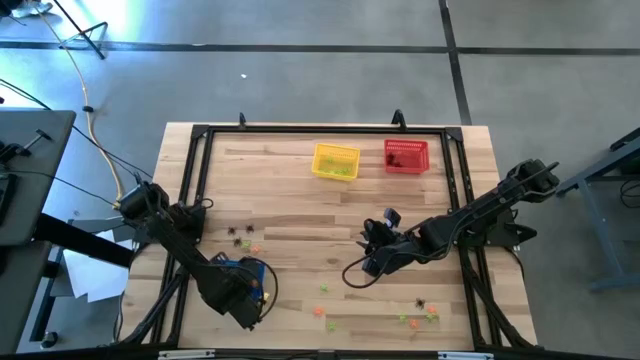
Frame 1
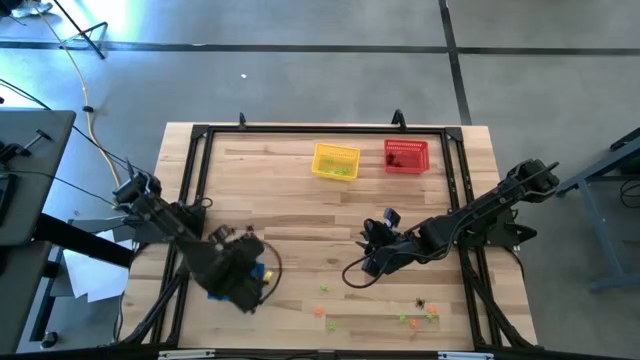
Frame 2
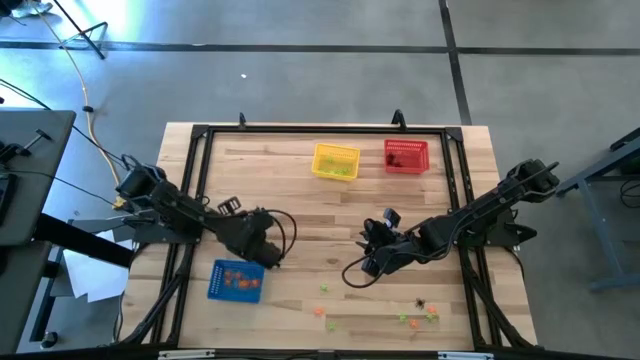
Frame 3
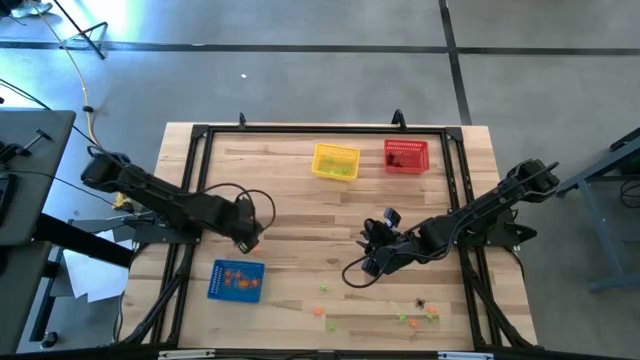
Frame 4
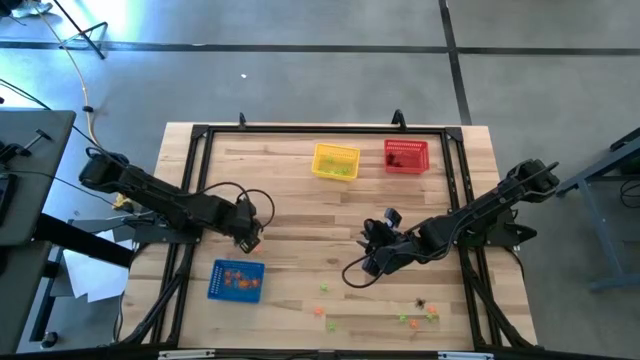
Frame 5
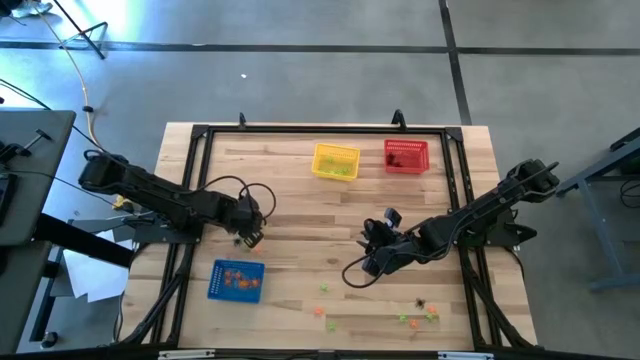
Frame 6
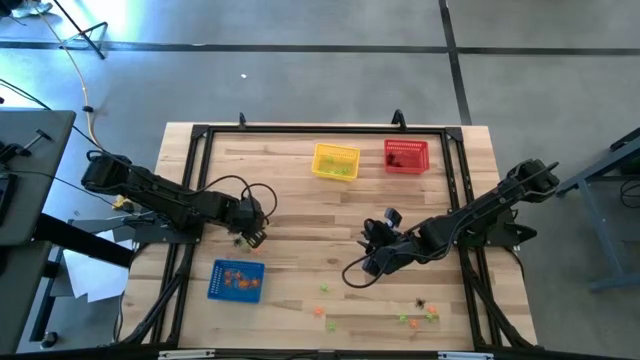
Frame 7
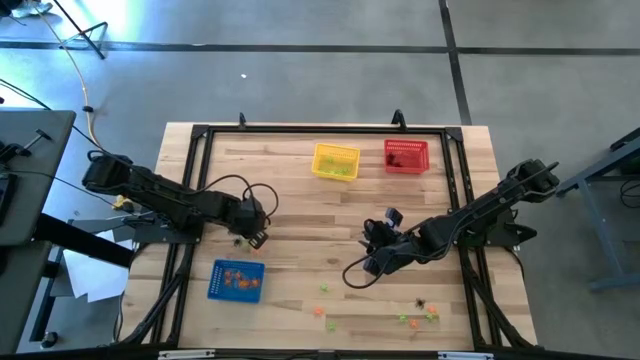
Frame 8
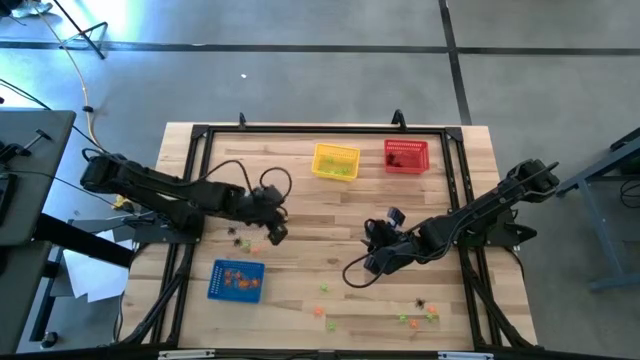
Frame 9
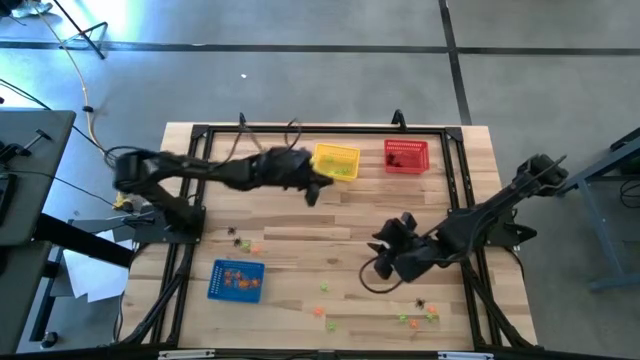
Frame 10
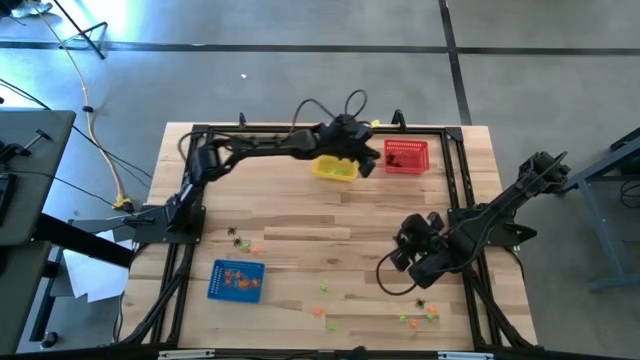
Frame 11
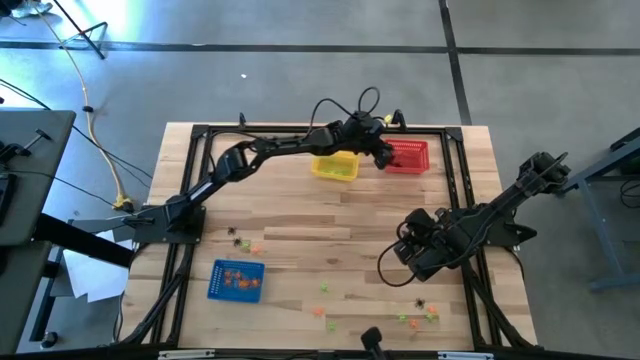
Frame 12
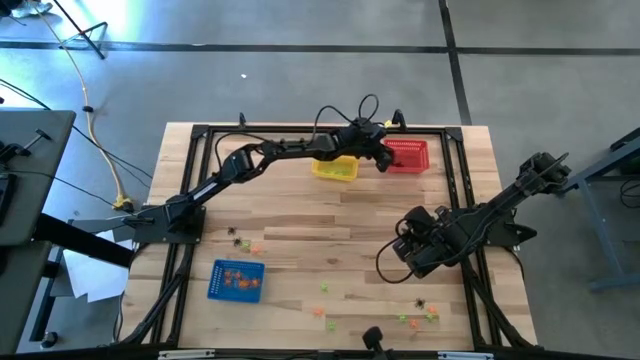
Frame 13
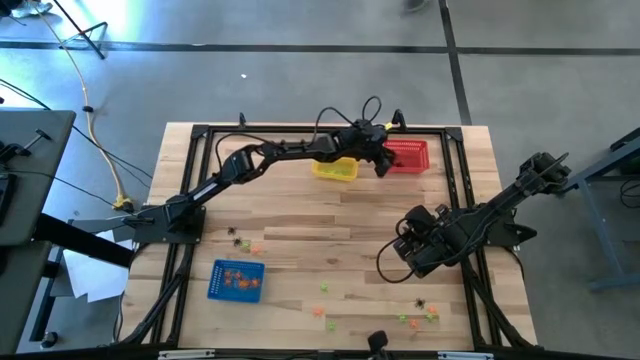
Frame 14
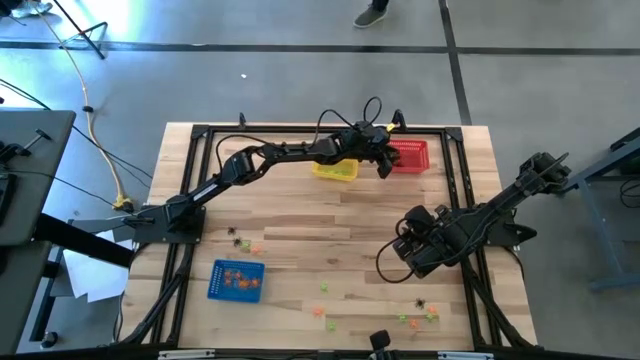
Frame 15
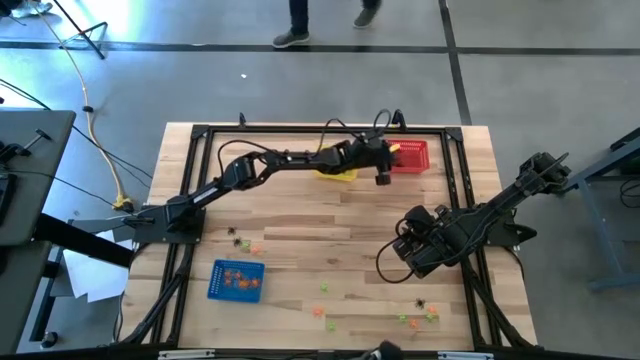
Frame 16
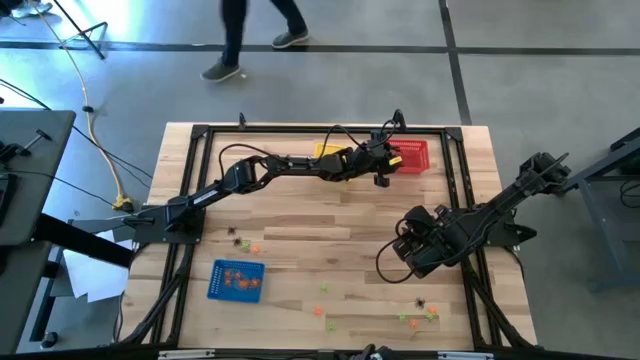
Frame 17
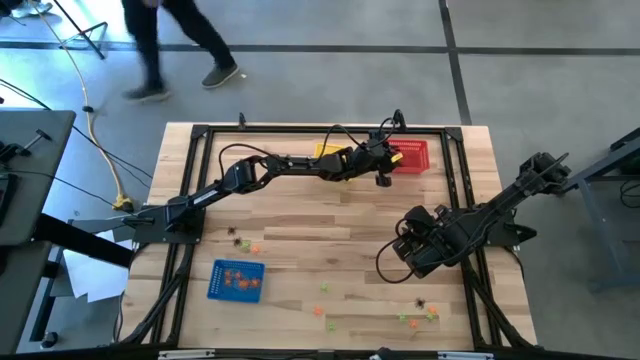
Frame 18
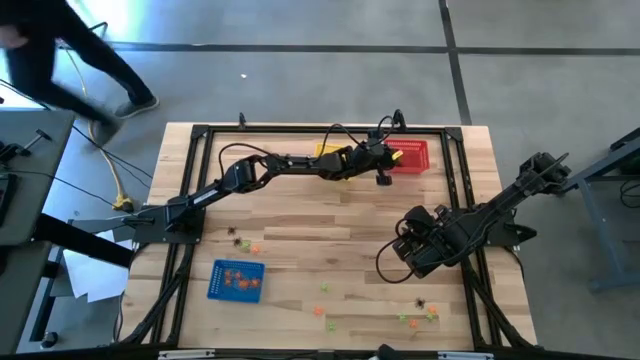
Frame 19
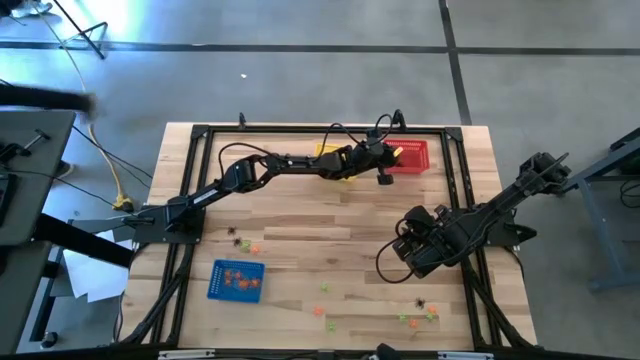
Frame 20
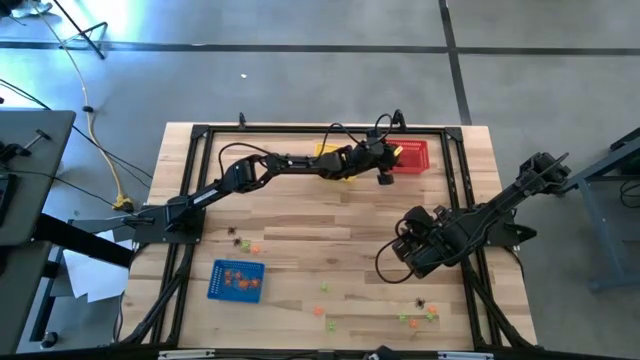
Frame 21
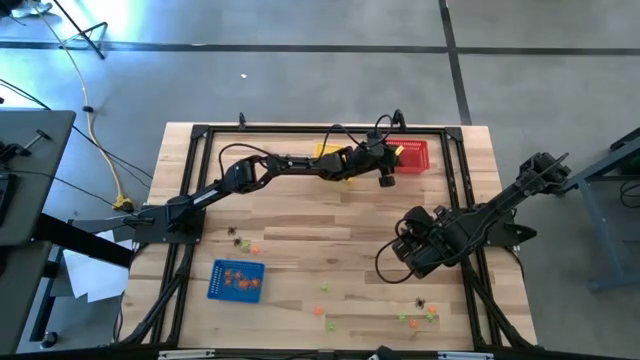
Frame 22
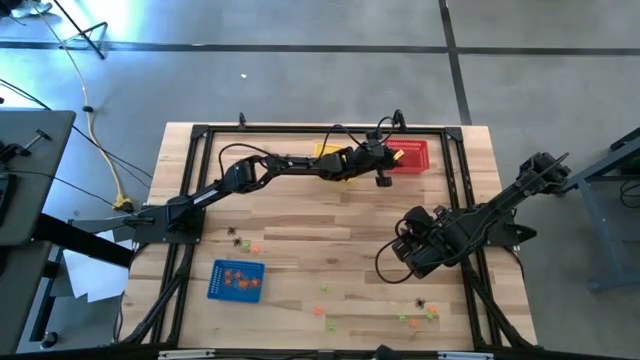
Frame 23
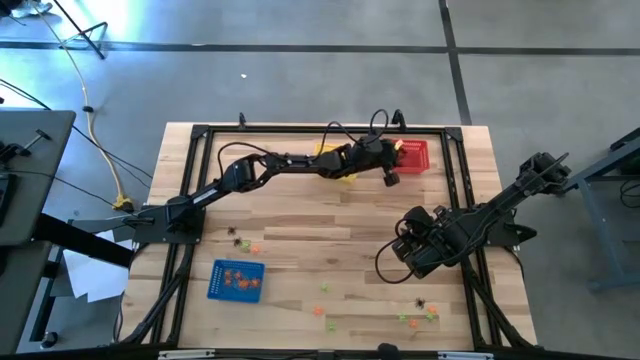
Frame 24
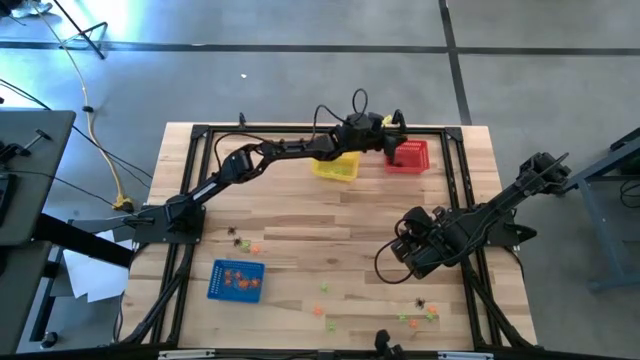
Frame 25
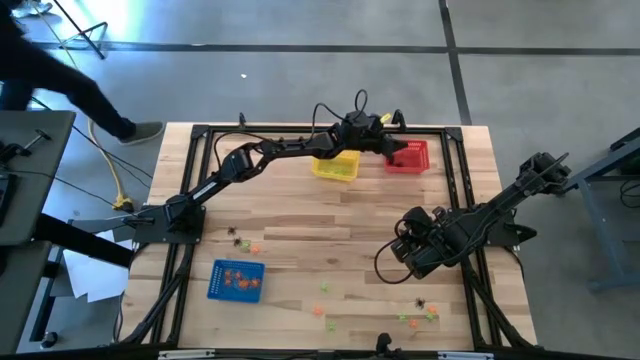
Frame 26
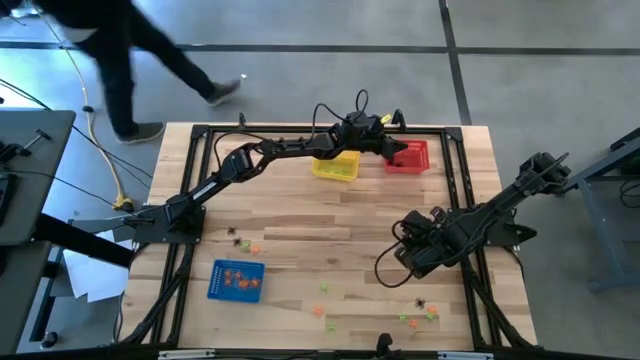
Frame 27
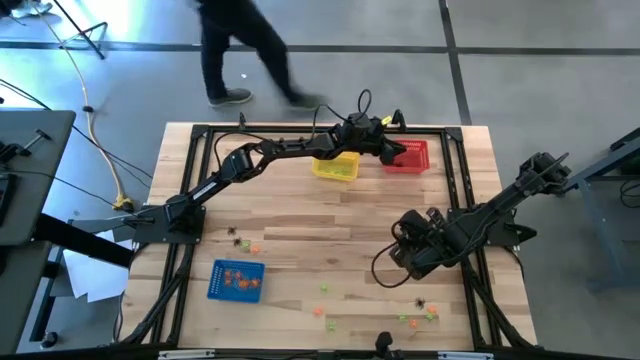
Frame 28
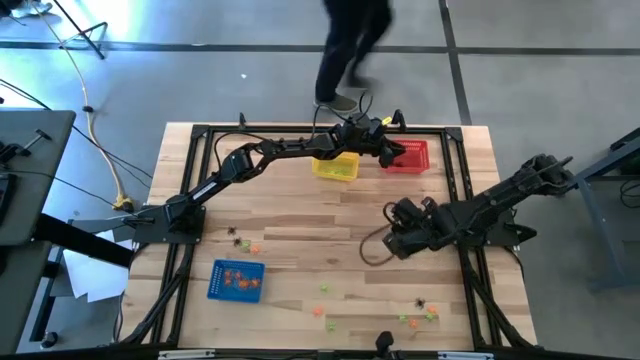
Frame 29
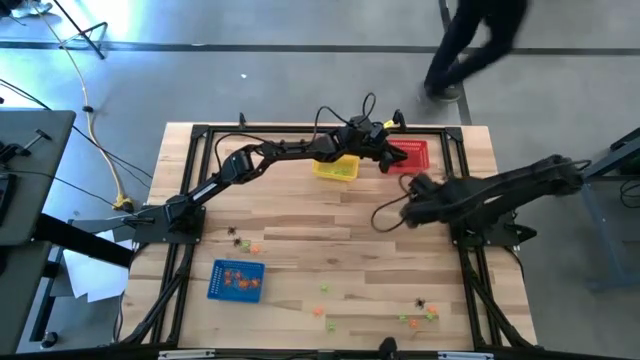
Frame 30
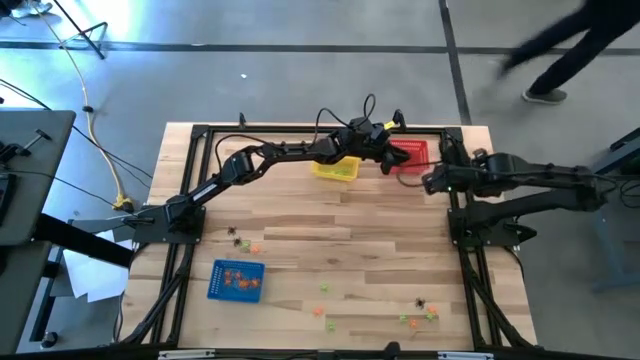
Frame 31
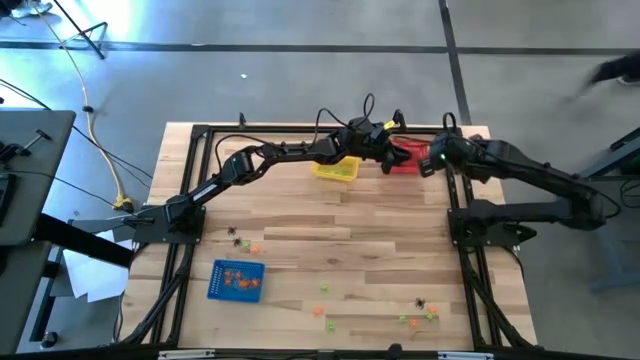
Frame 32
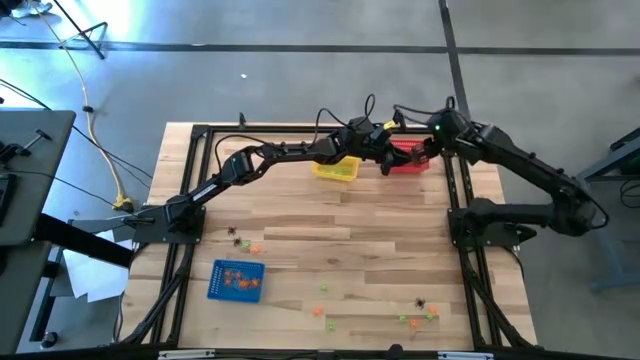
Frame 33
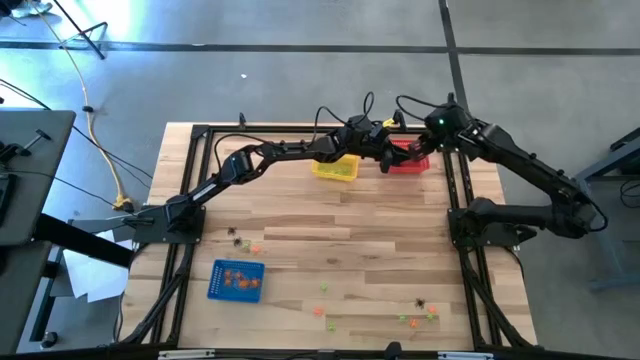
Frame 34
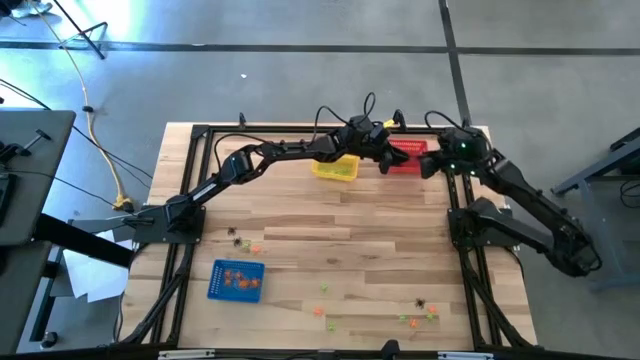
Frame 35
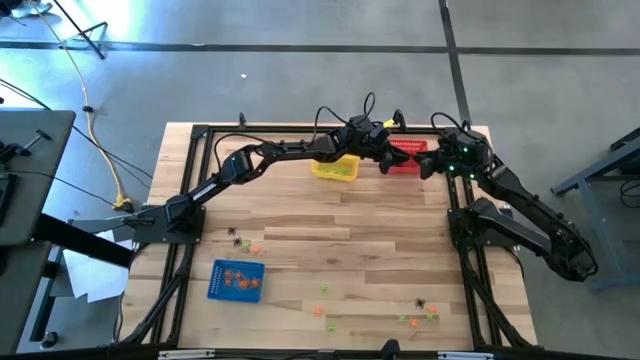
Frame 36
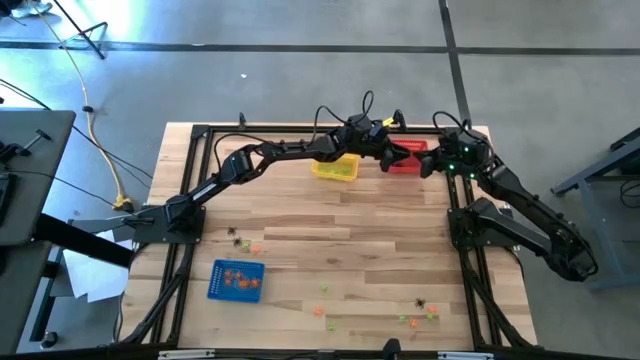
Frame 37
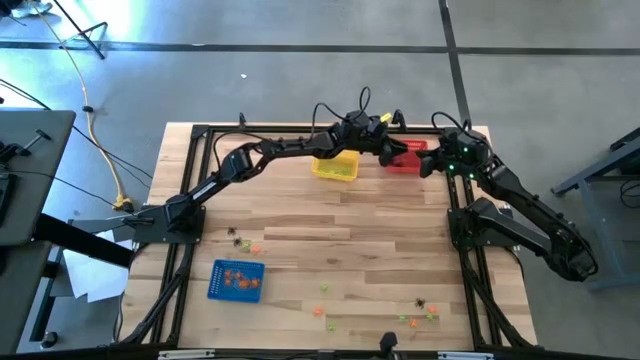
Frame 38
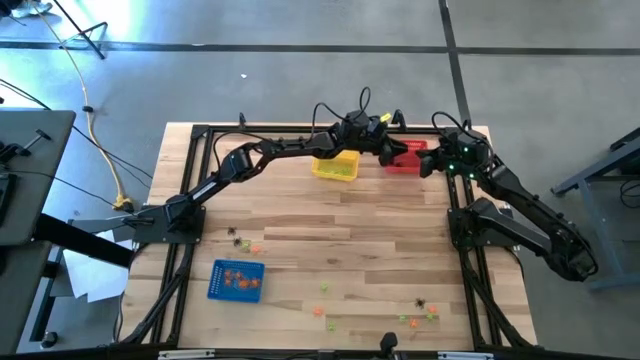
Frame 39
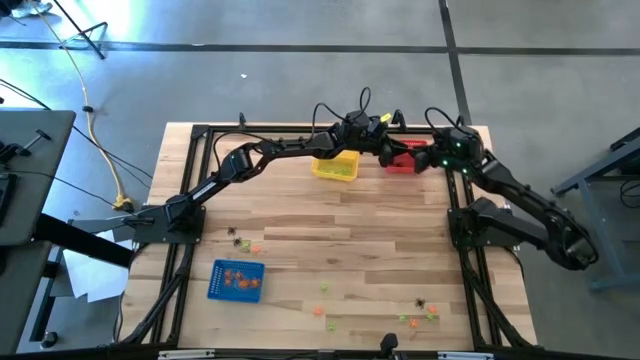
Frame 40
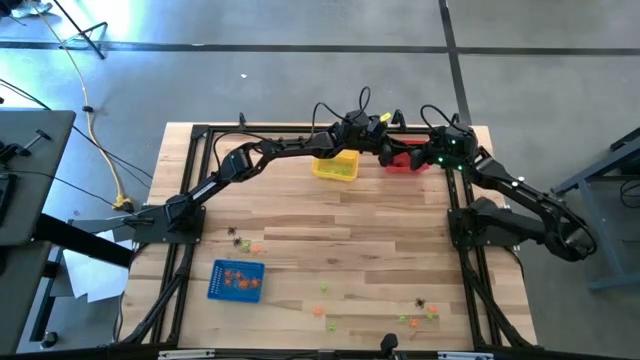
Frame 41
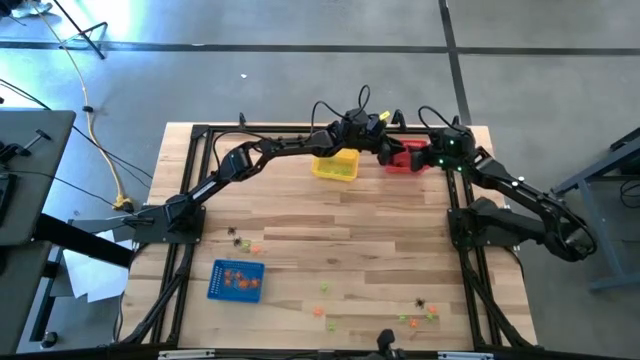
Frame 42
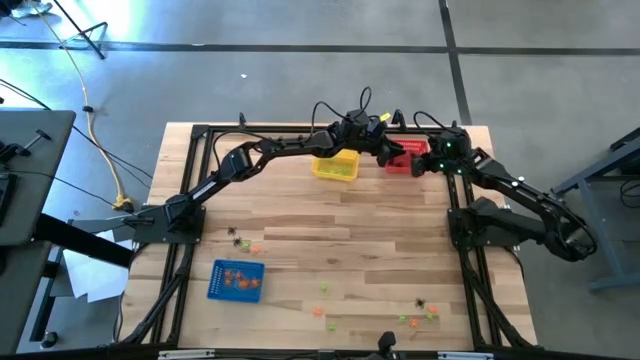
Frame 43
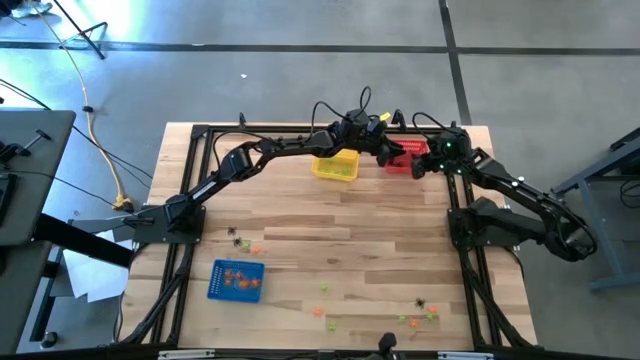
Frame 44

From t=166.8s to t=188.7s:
Task: Sort Halloween decoration
Put the black spider toy into the red bin
